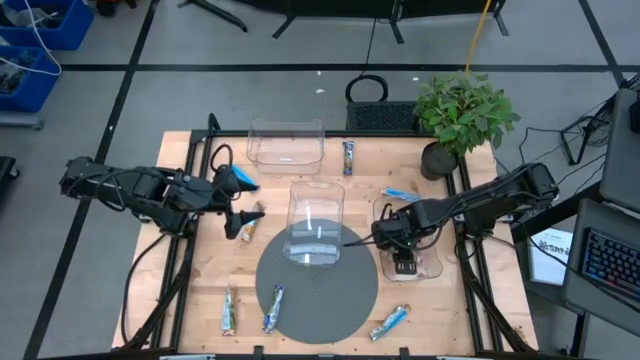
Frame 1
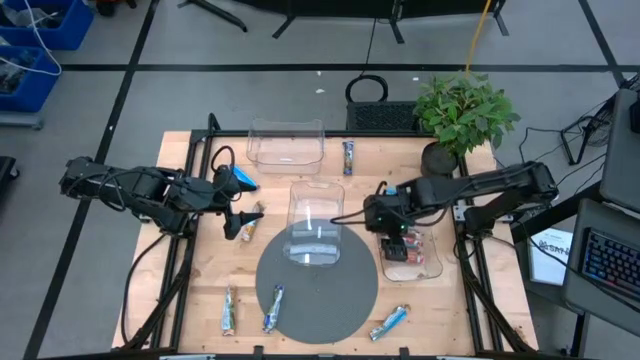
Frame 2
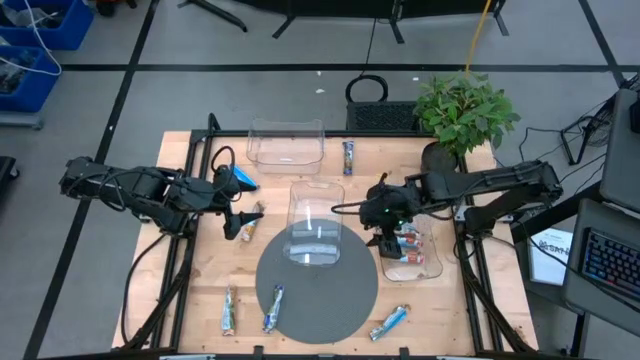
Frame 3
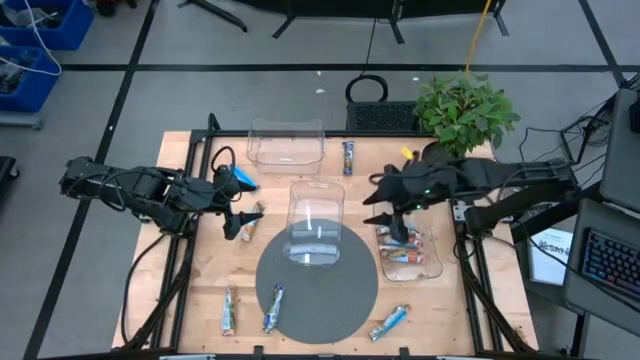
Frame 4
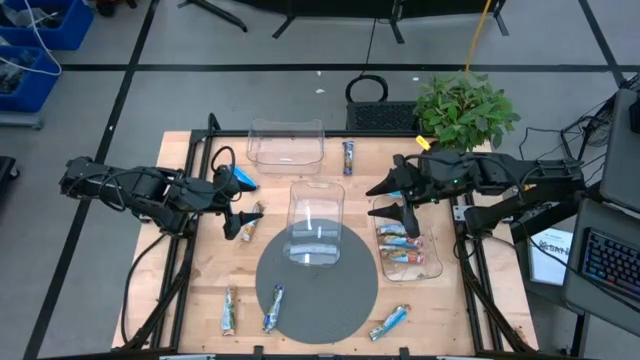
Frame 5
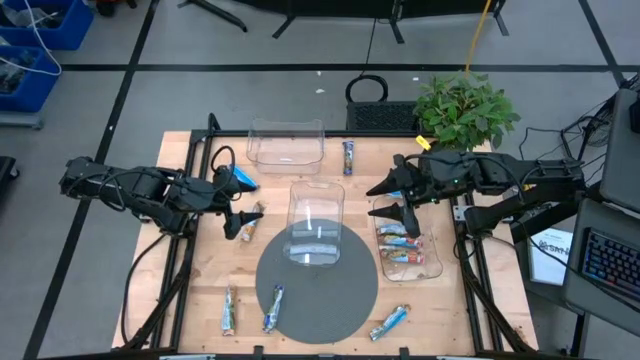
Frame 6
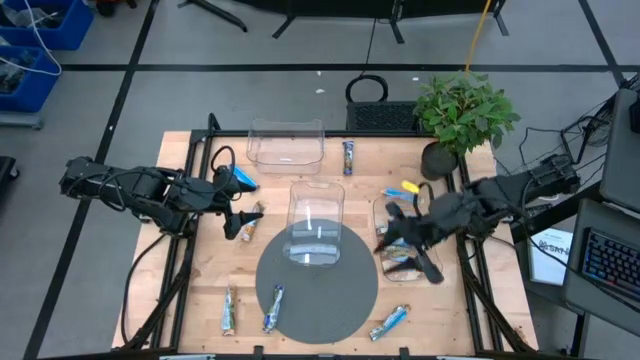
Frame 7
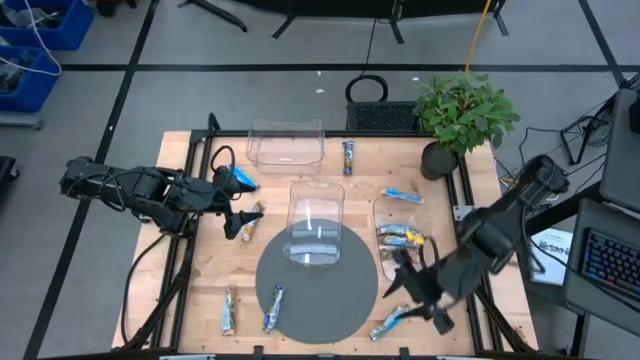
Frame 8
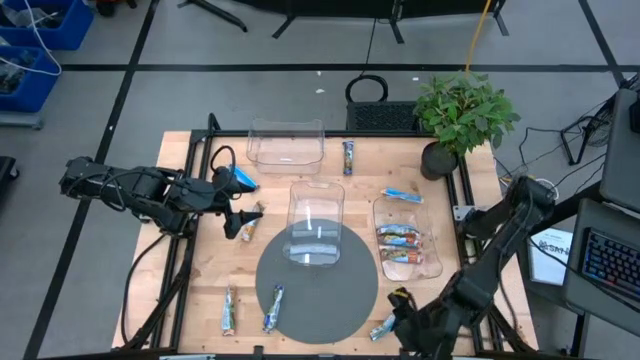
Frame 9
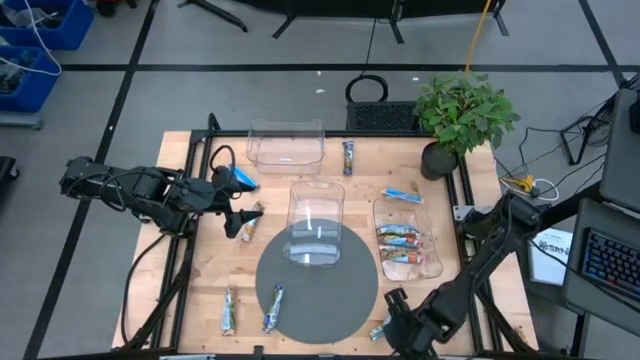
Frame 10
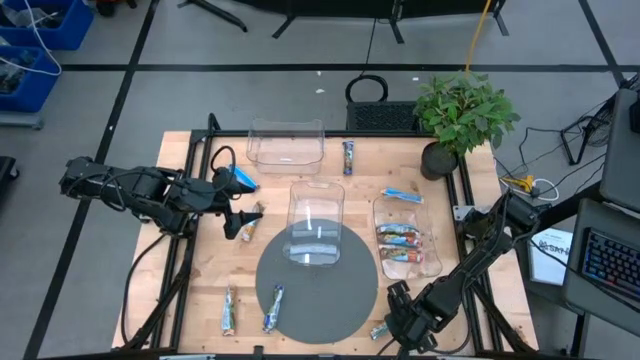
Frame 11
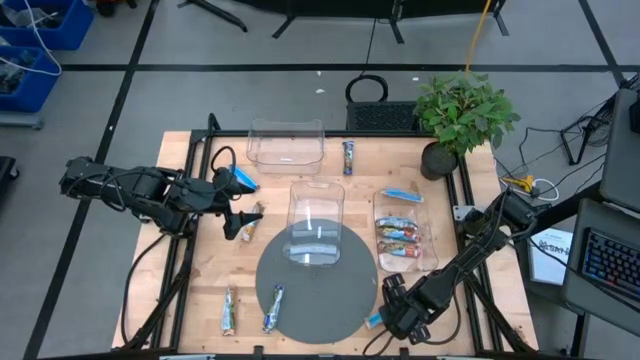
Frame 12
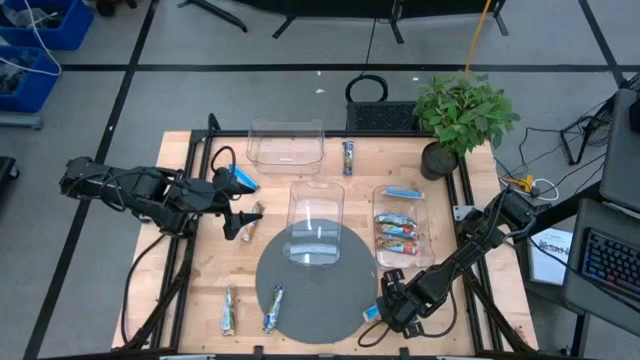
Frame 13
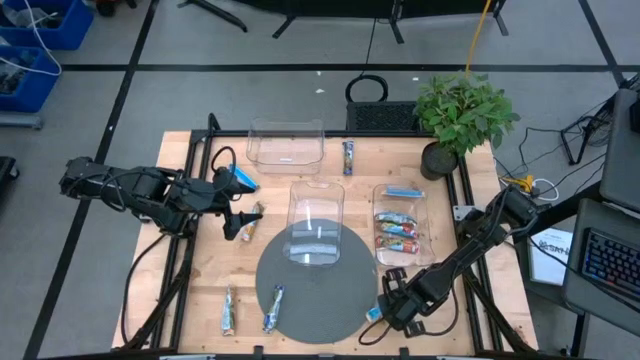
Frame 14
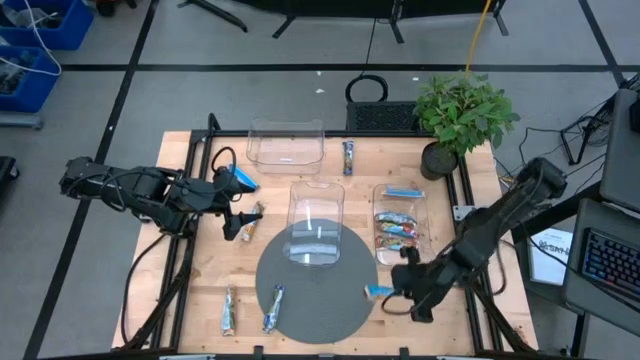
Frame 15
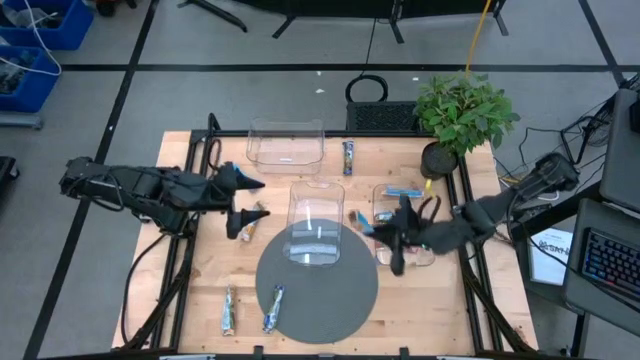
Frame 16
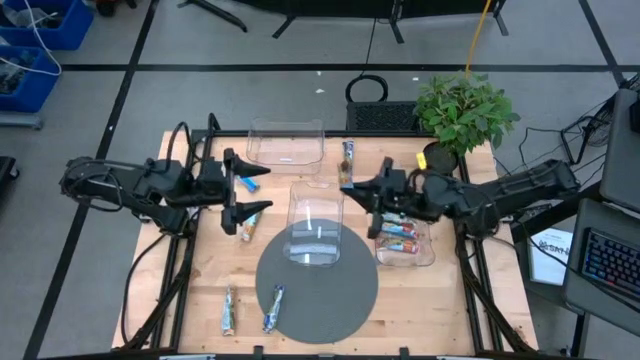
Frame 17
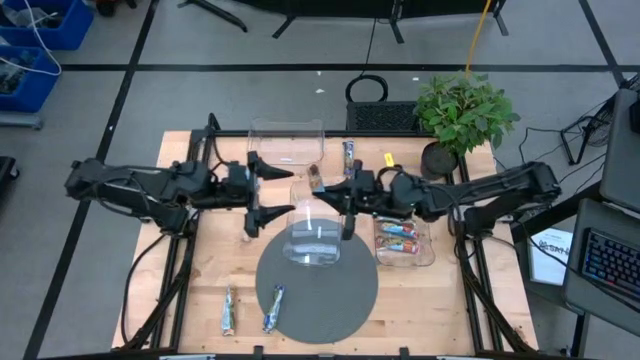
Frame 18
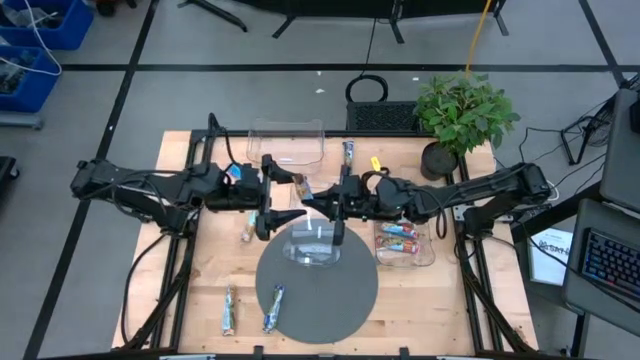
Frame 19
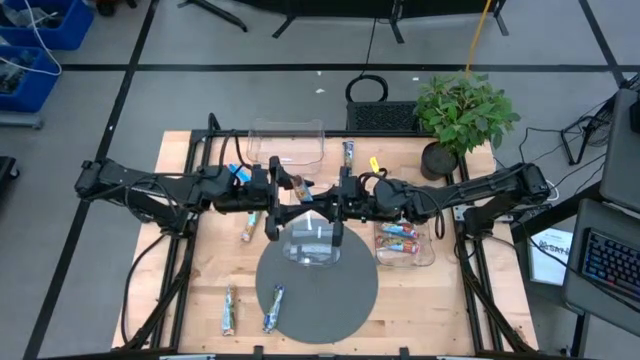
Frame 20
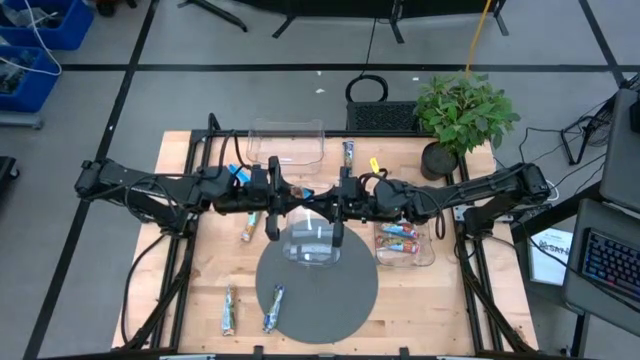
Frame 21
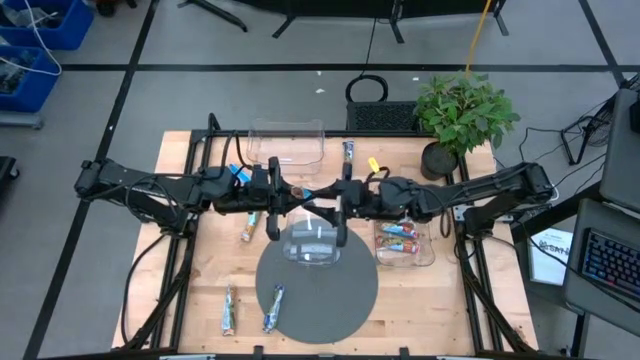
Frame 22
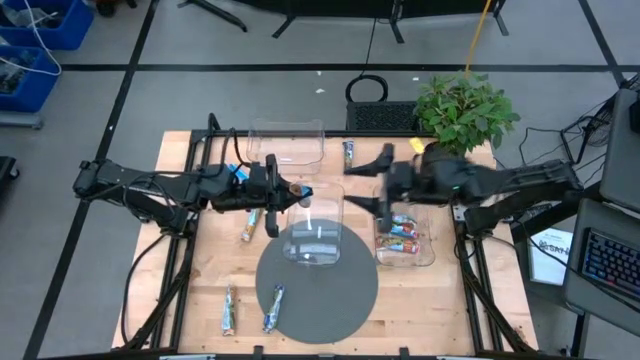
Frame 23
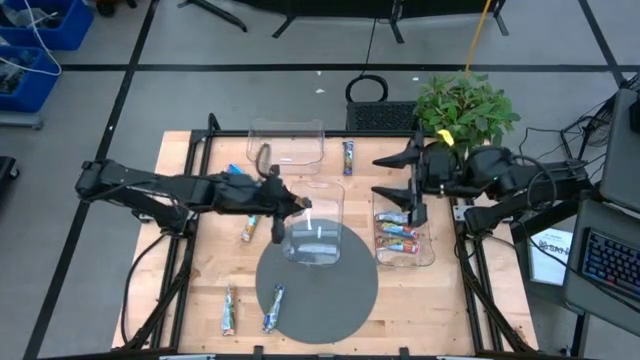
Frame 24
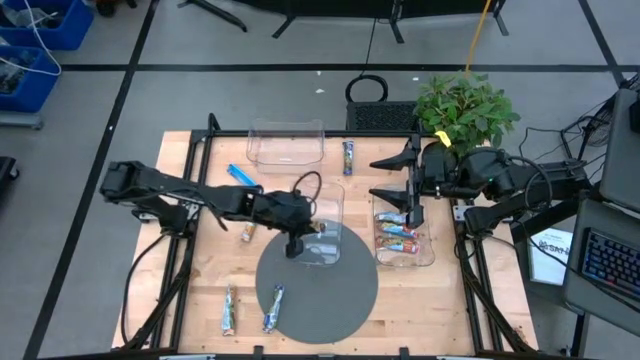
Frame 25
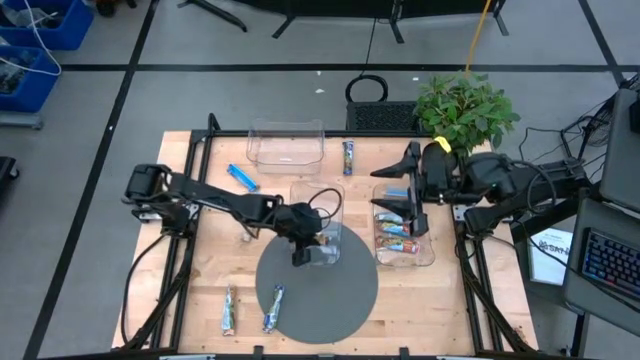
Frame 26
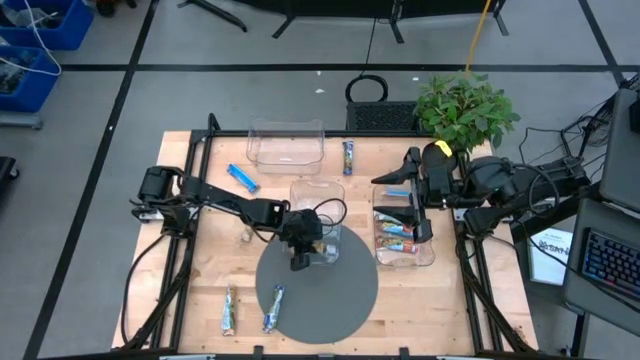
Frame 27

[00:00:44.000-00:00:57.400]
Task: Pick and place Granola Bars by type
Put the yellow granola bar into the bottom left transparent bin

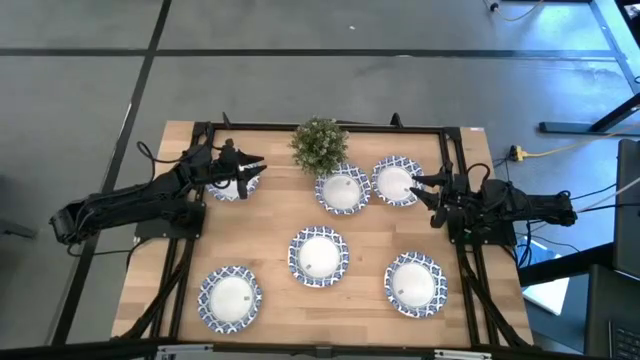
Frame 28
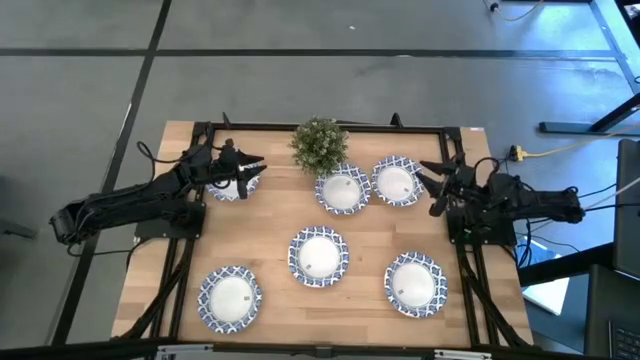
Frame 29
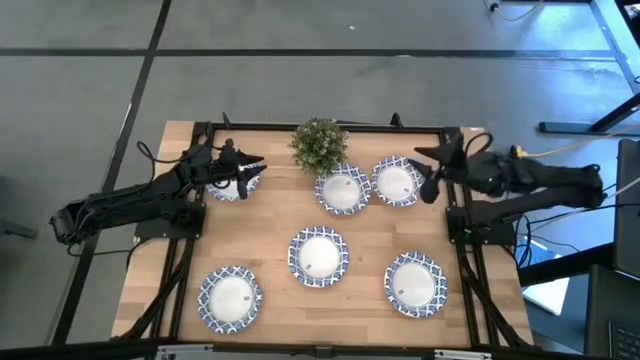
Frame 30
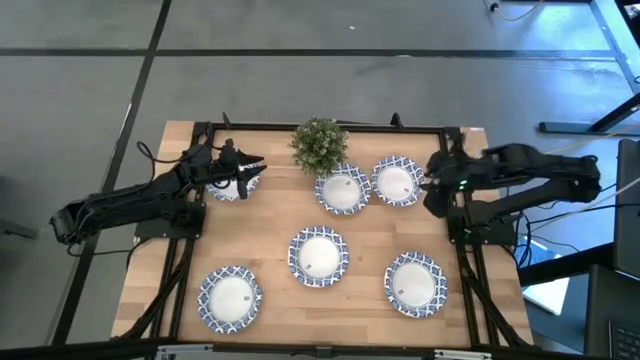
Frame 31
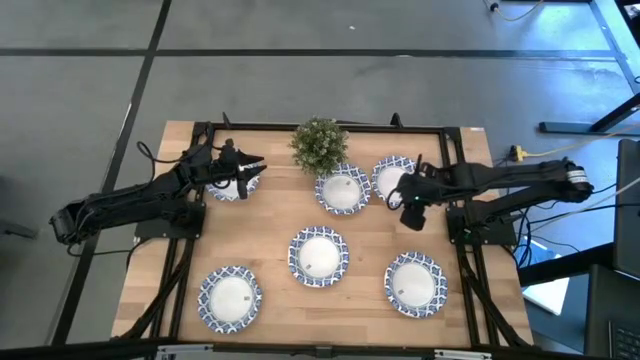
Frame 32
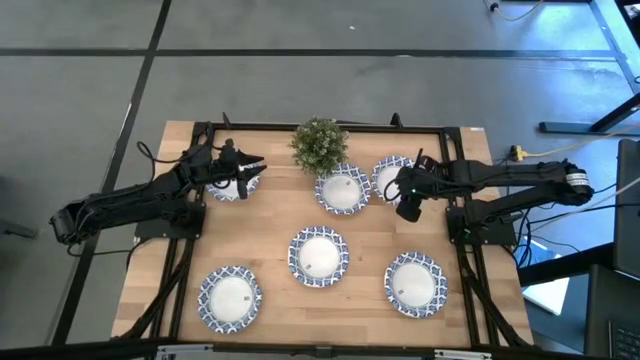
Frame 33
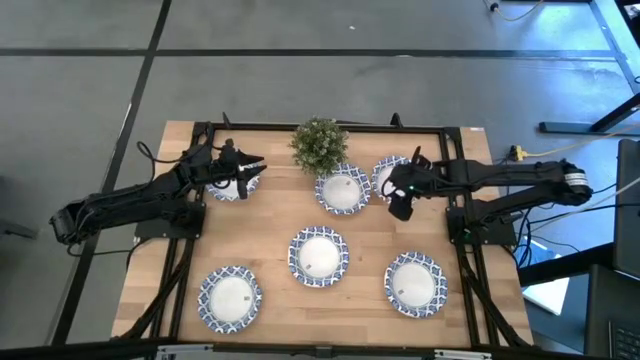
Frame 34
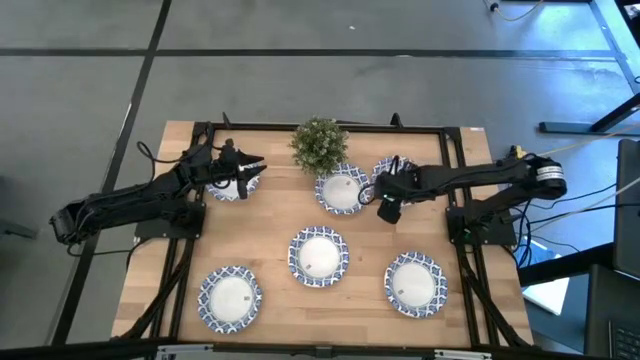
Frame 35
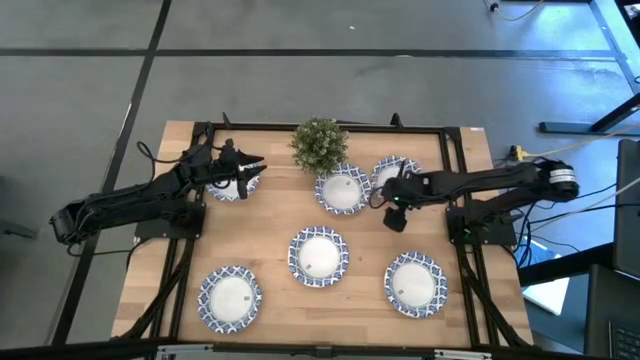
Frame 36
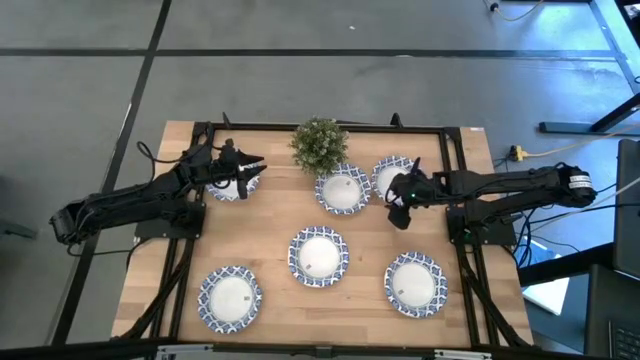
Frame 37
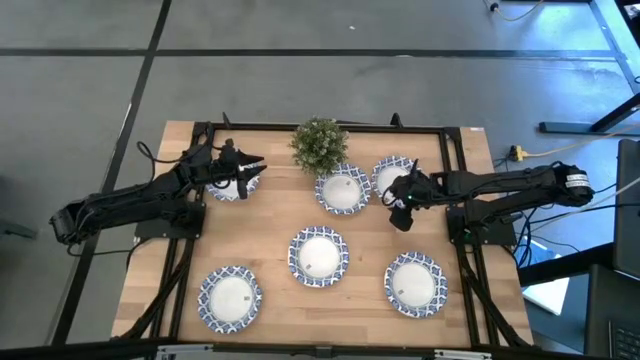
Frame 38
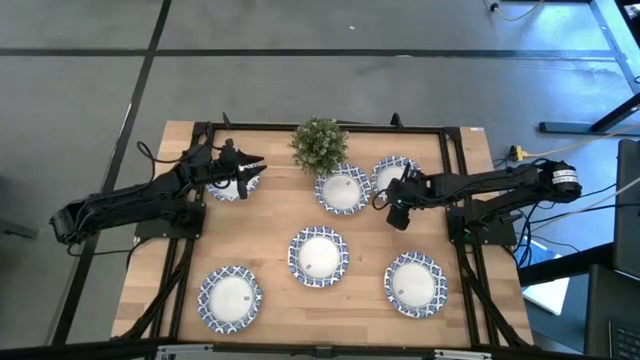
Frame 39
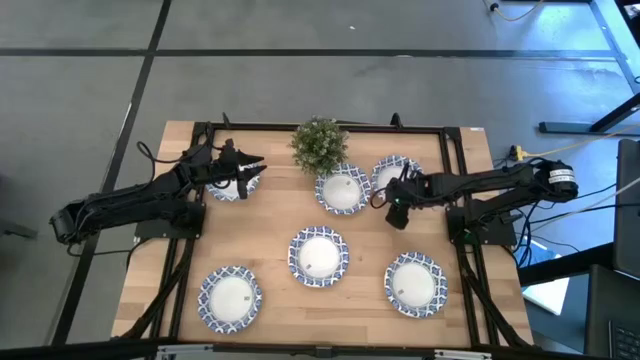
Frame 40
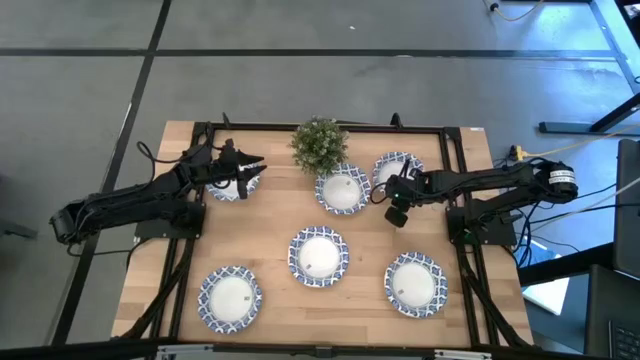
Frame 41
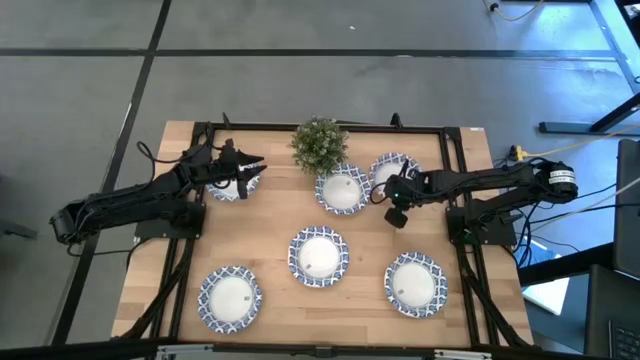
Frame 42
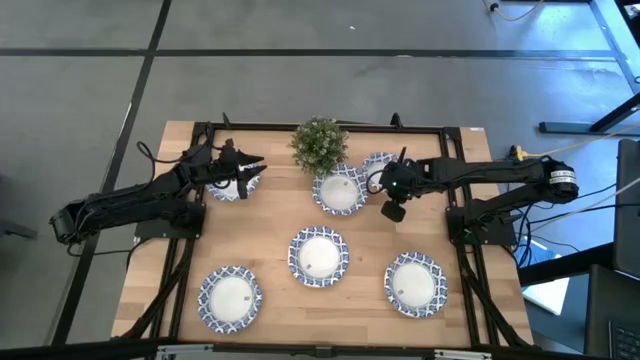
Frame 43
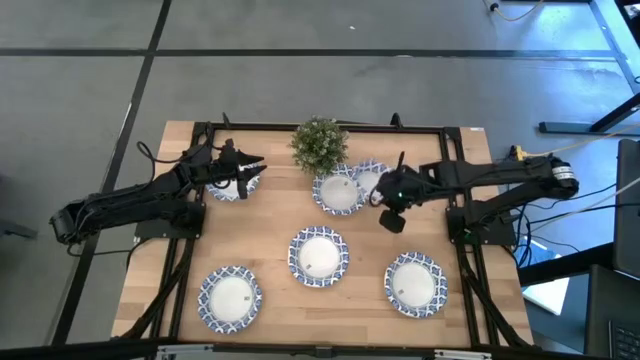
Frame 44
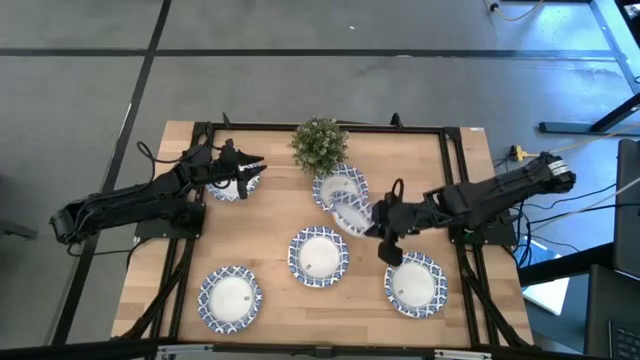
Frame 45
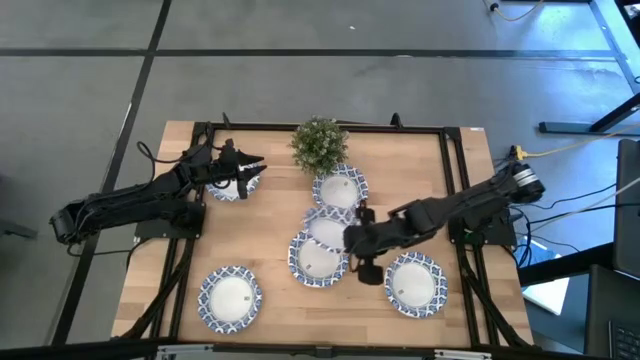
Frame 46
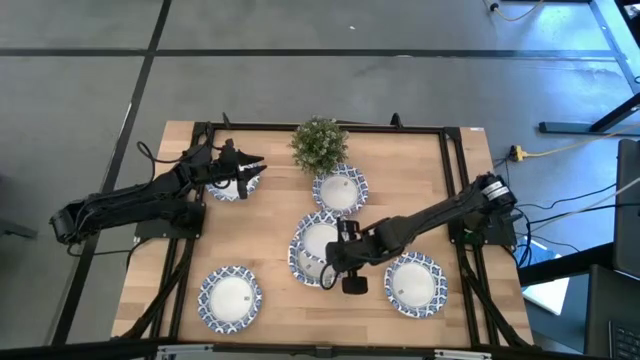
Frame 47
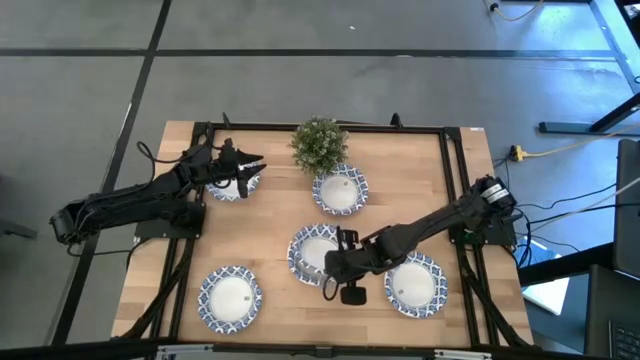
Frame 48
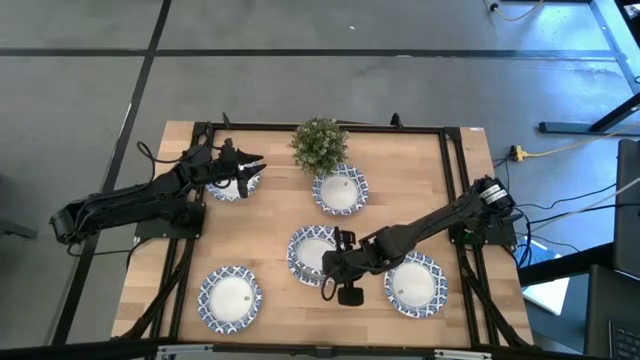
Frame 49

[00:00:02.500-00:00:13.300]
Task: Nest bowls inside each other
Stack the blue pattern bowl on the blue pattern bowl
